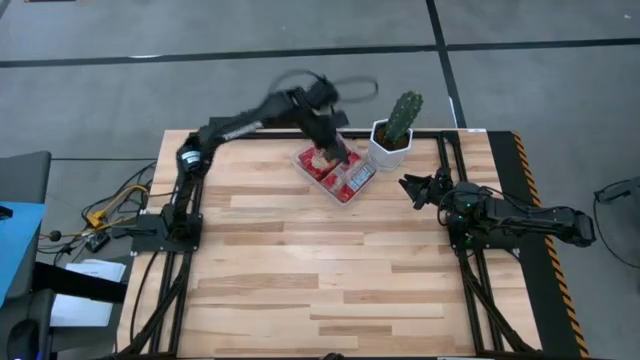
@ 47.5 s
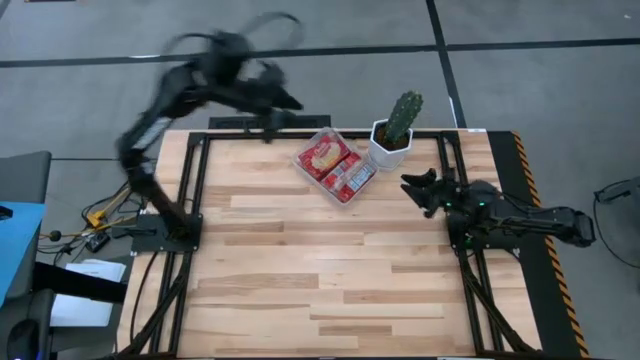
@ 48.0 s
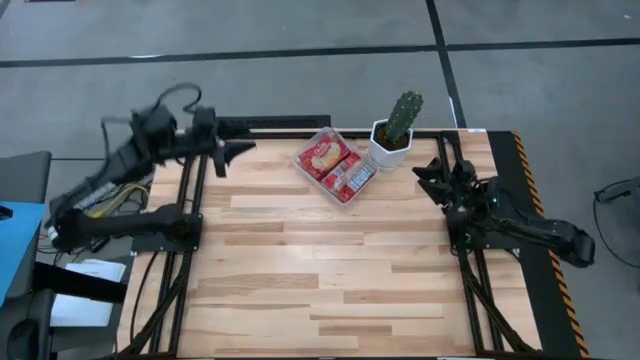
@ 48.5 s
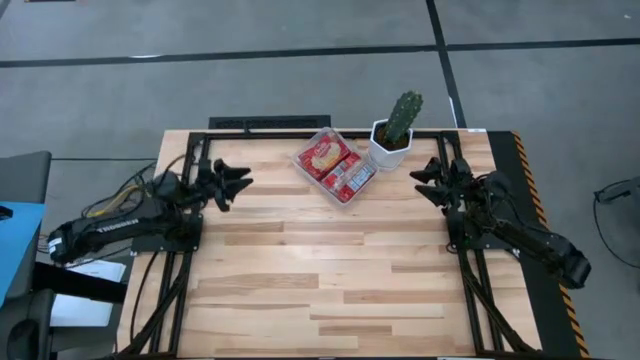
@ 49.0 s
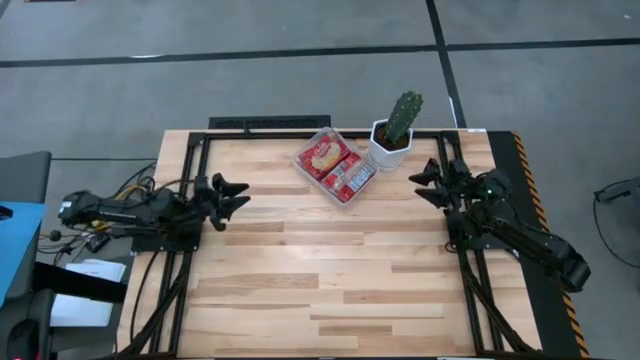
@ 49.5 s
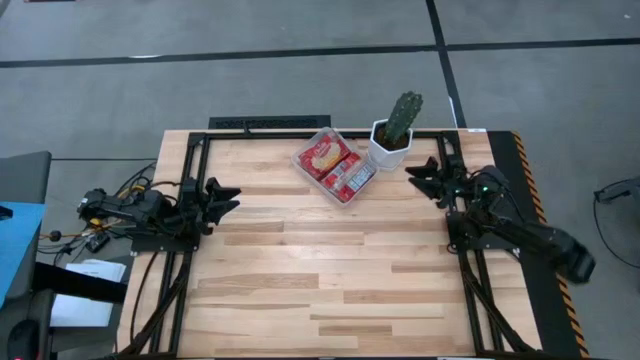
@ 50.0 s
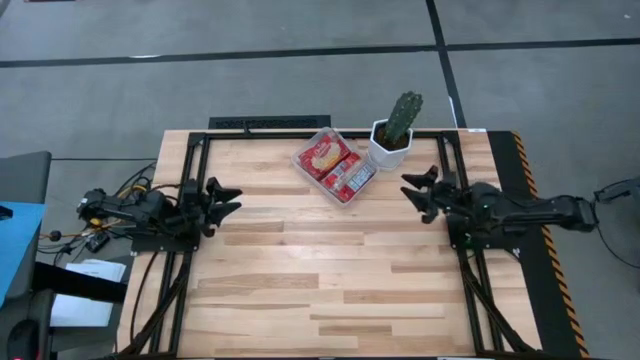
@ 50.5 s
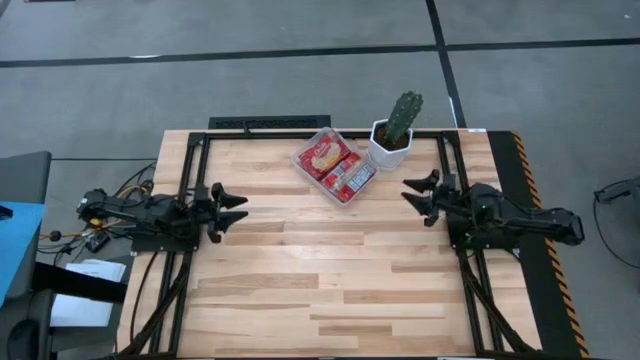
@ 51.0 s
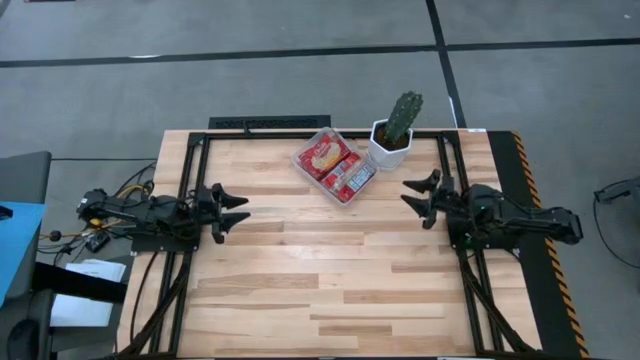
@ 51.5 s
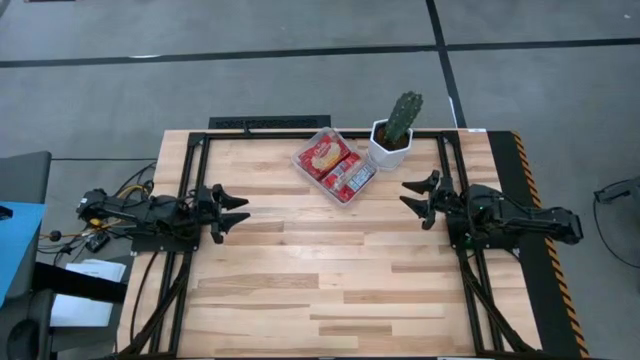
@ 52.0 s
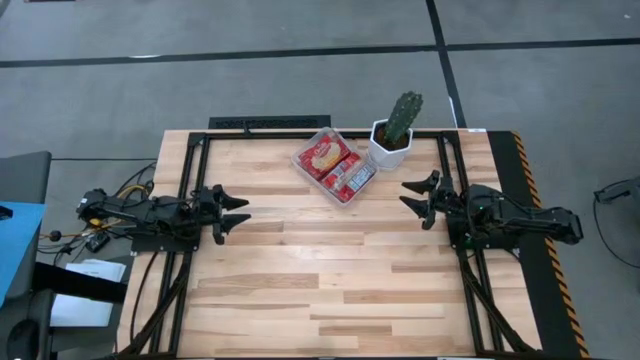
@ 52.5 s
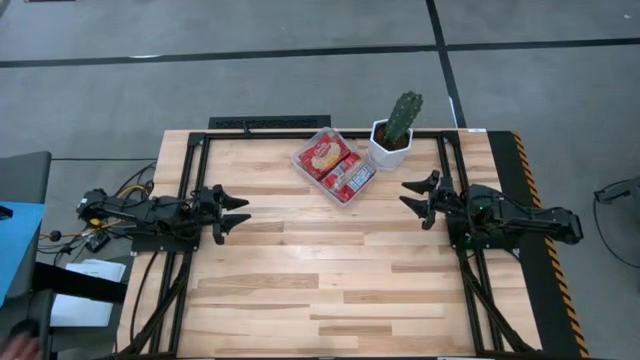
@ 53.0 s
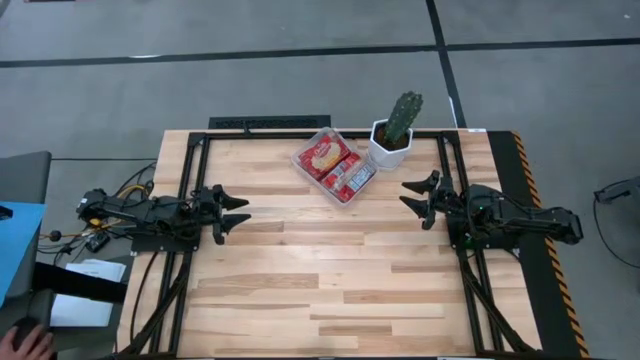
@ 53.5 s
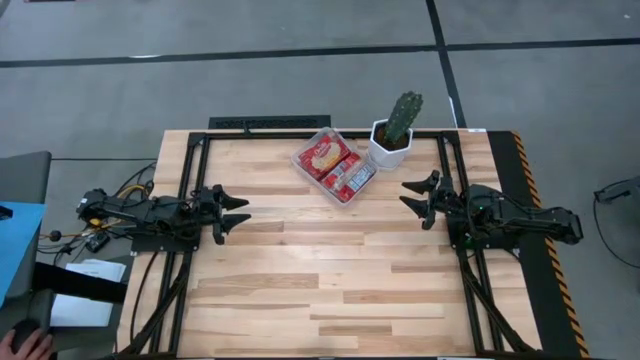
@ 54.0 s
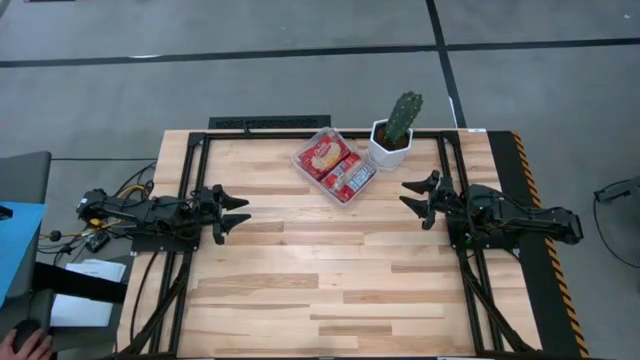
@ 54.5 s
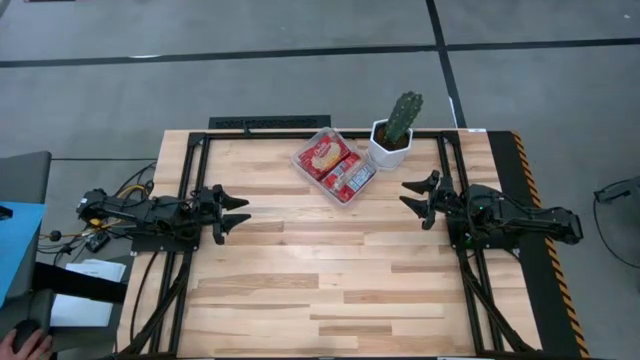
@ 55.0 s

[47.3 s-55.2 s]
Task: Sort popcorn bags into baskets
Return to Home Position

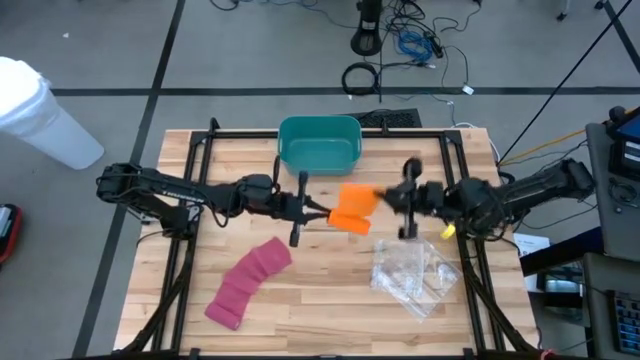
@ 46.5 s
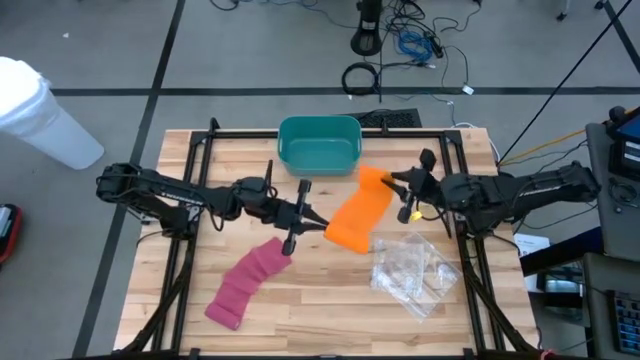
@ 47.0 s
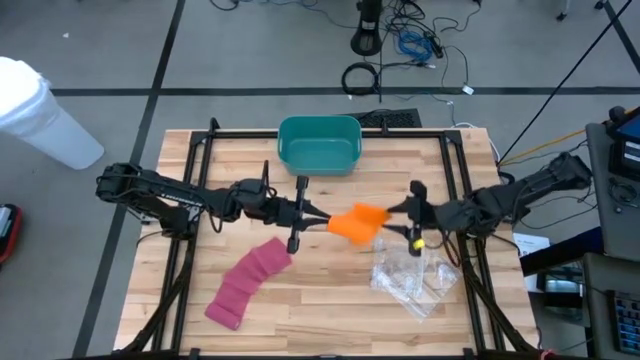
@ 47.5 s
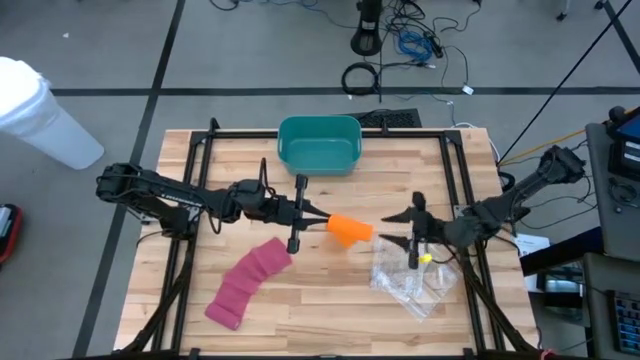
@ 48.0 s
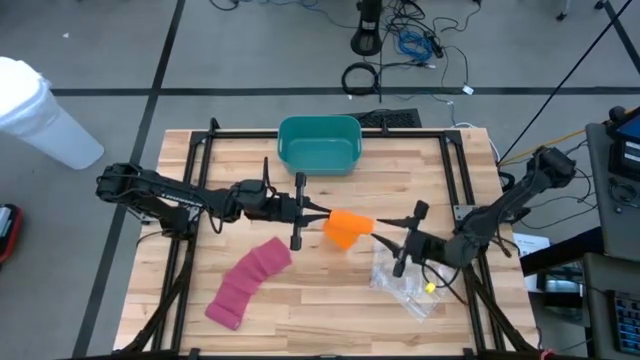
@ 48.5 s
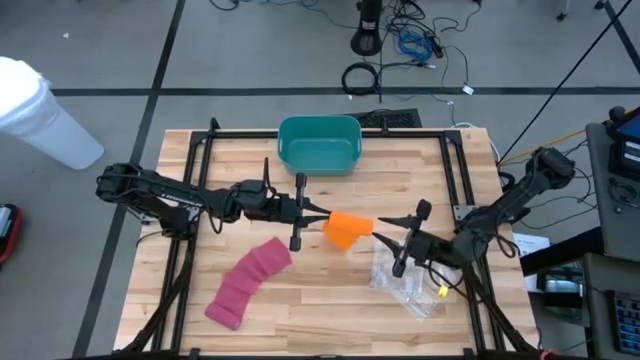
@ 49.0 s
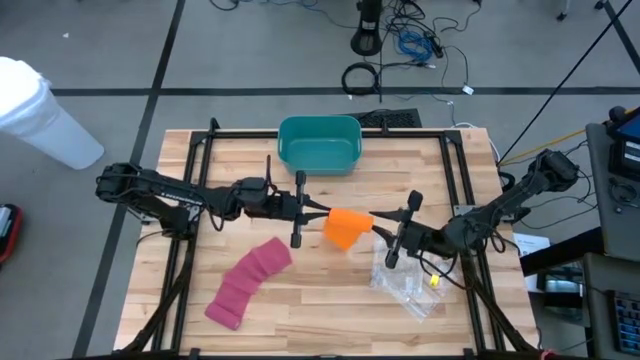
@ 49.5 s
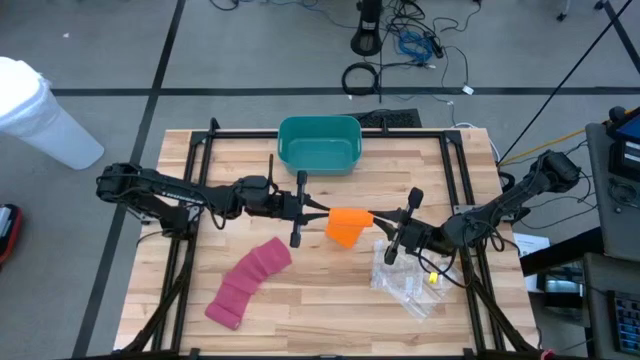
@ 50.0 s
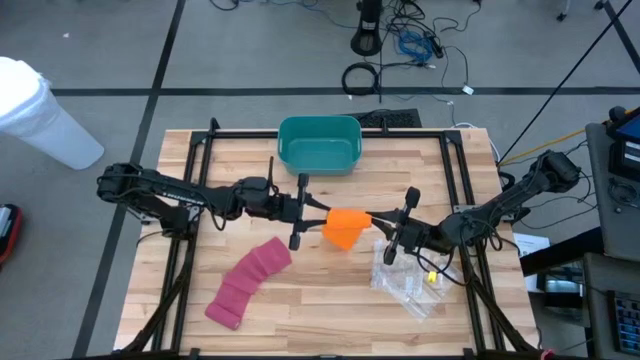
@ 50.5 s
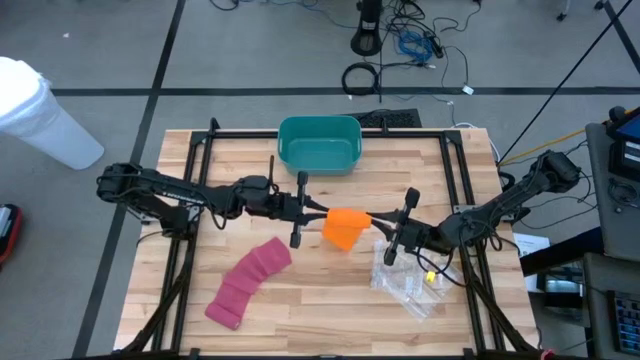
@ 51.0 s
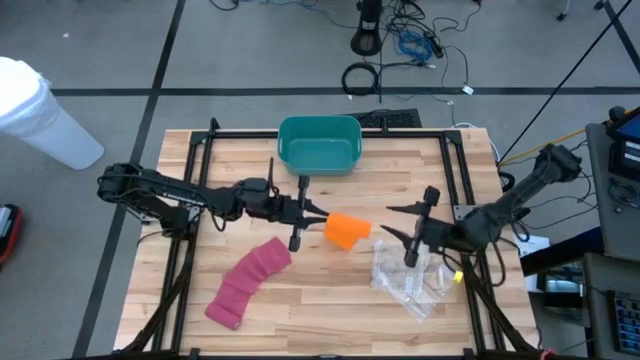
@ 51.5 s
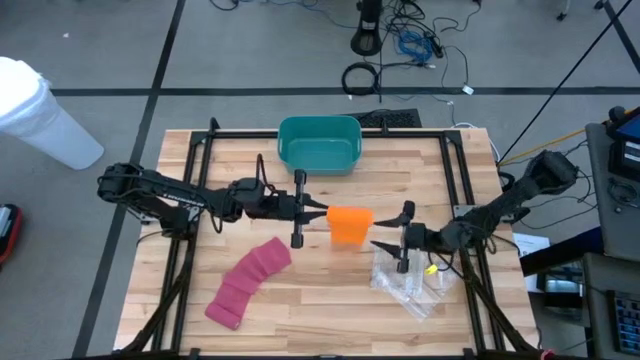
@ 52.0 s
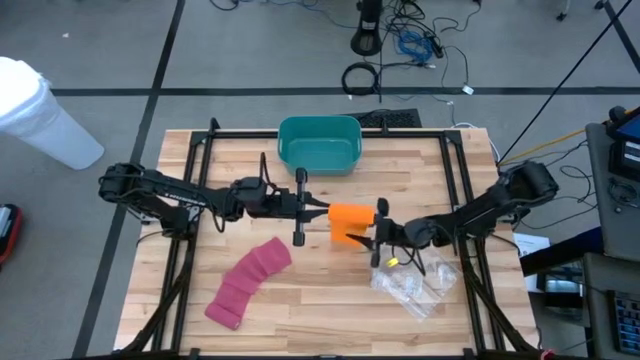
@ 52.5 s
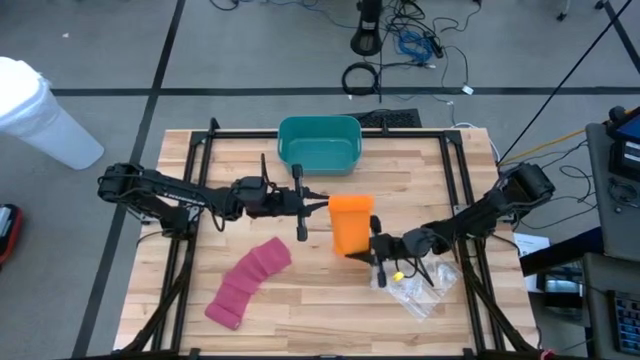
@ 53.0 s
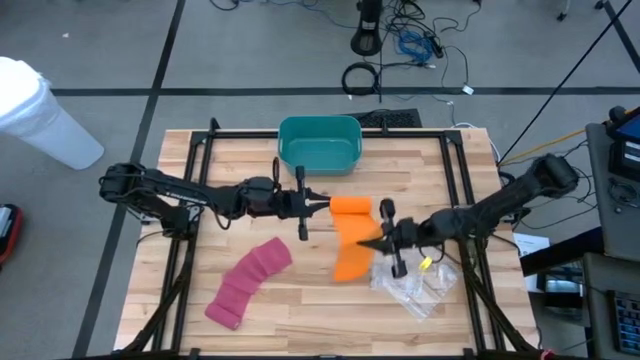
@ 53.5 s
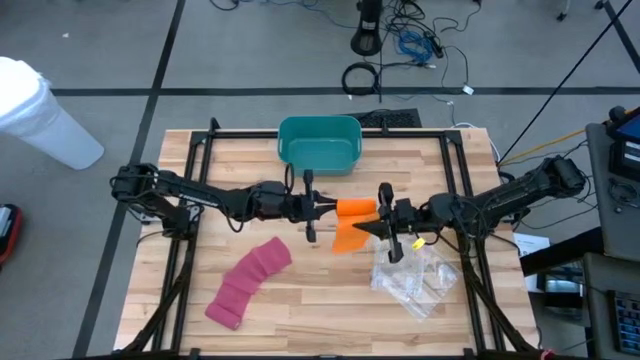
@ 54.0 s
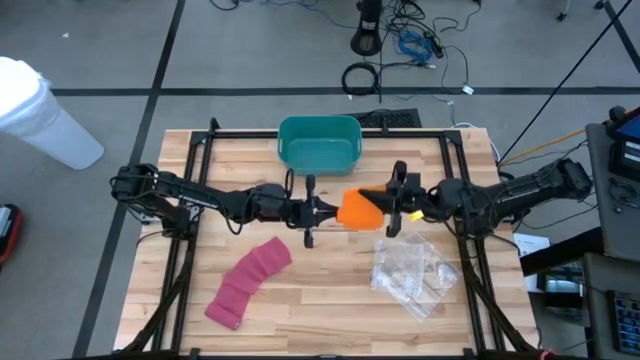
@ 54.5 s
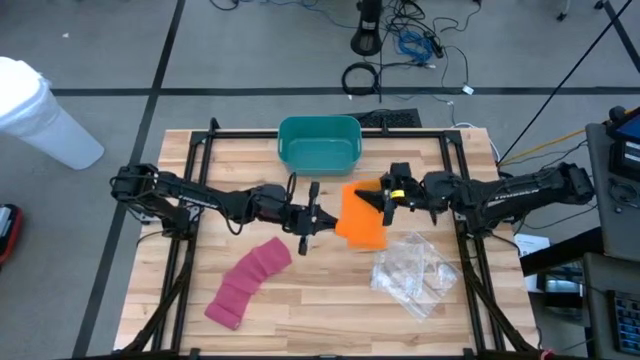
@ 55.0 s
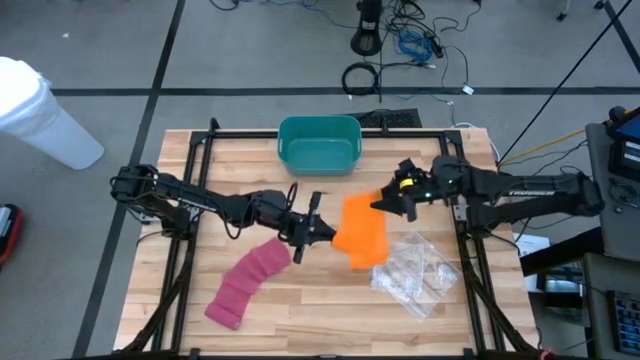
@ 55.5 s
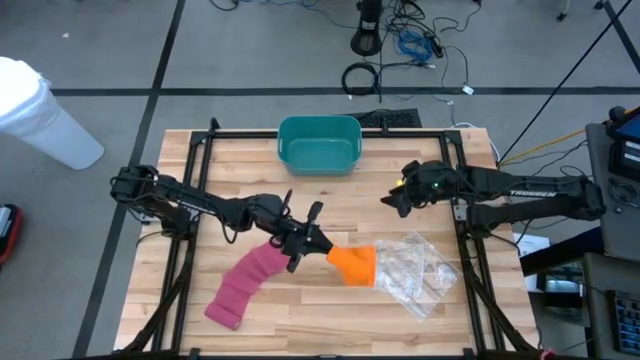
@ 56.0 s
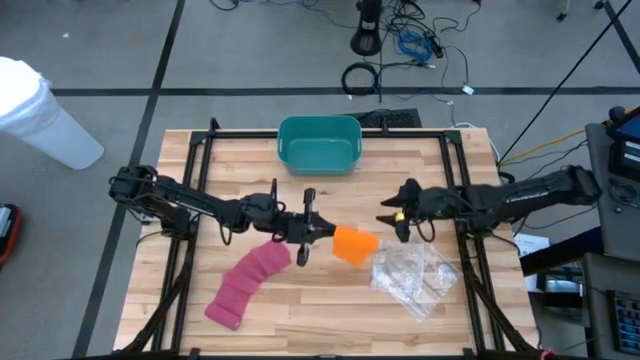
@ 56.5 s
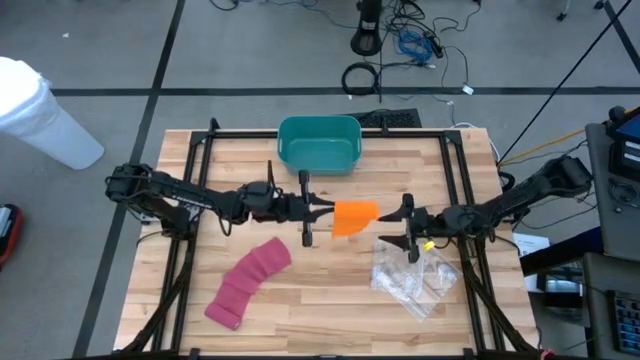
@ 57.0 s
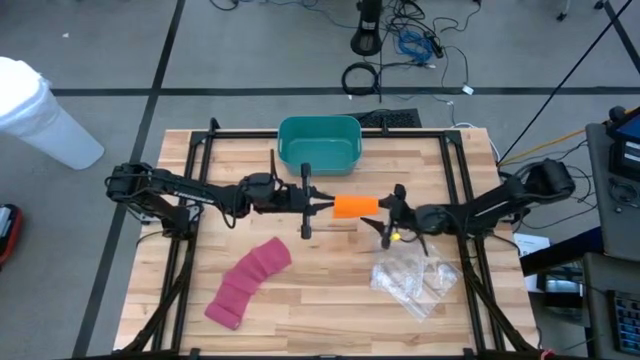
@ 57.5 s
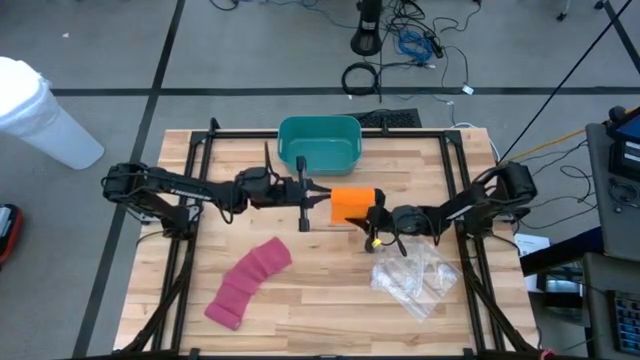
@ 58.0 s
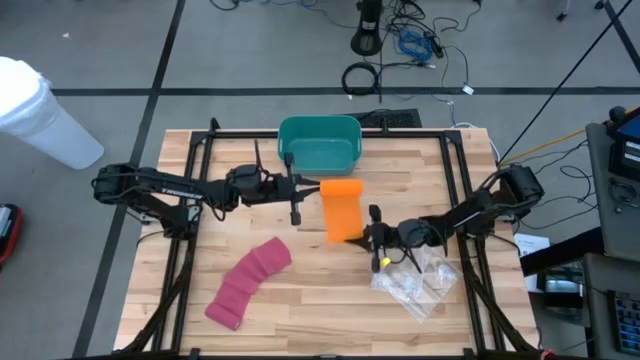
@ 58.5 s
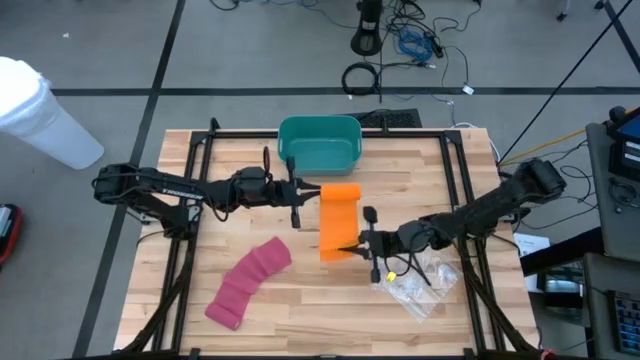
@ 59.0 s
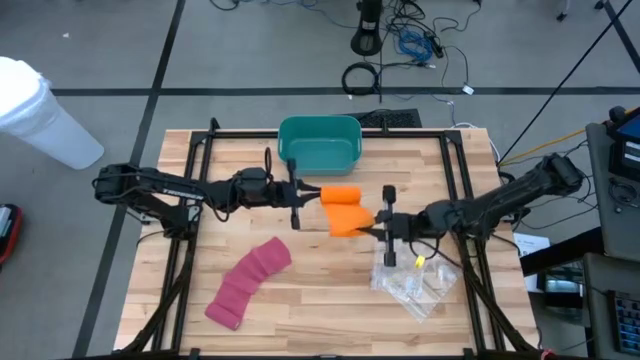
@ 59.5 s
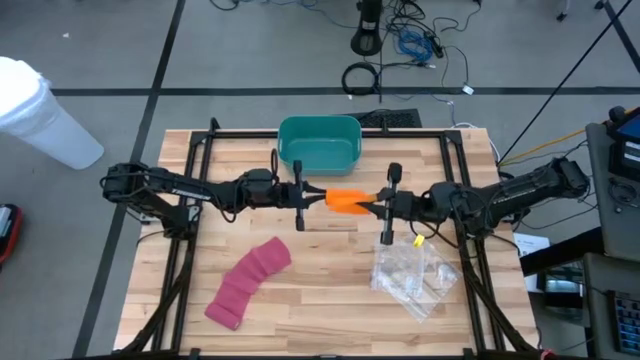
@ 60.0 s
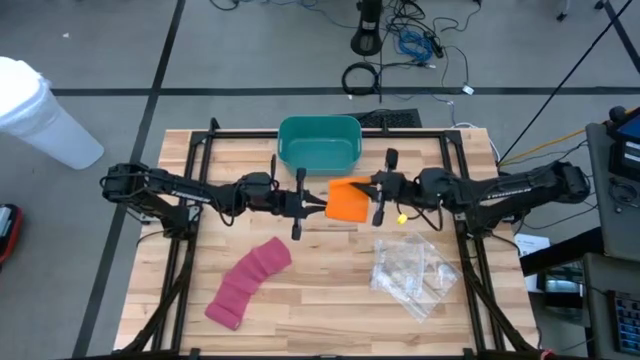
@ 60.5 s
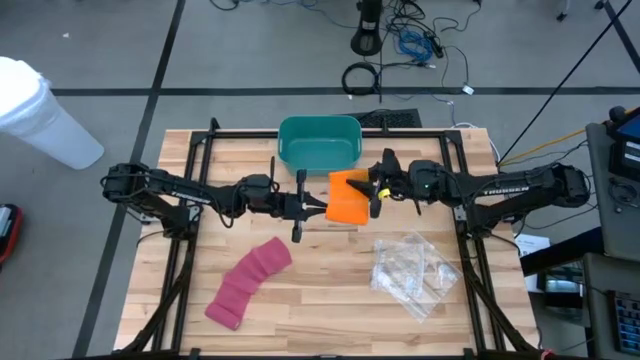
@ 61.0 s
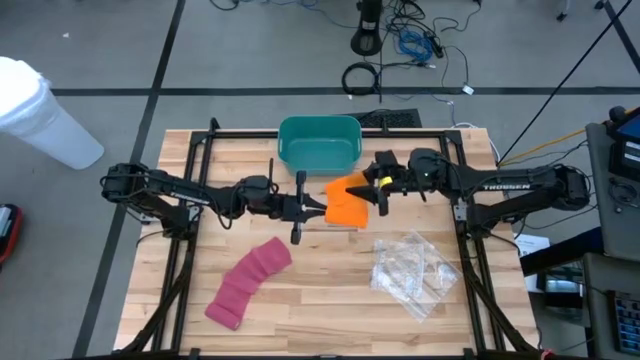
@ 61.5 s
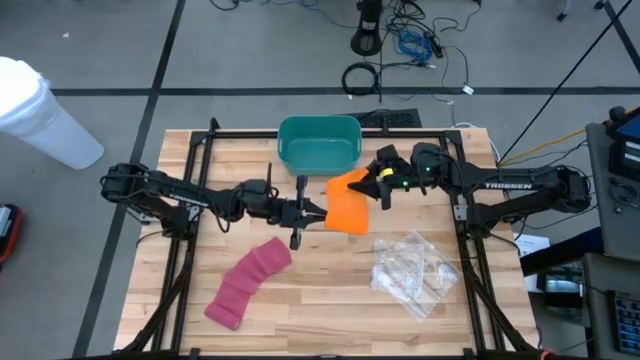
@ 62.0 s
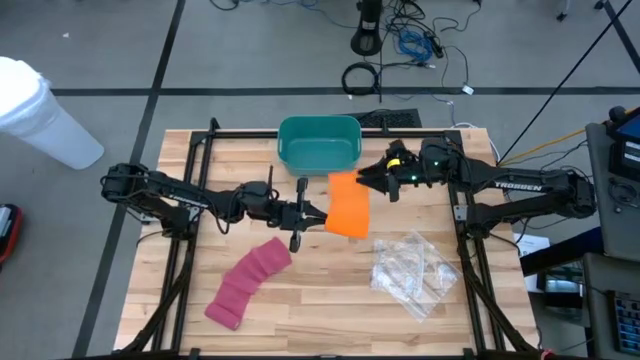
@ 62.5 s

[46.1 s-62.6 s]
Task: Roll bandage
Roll the orange bandage
